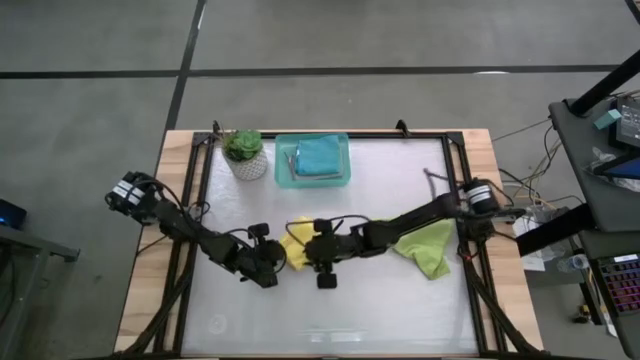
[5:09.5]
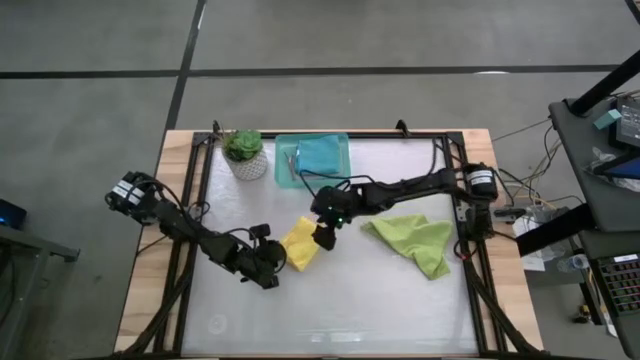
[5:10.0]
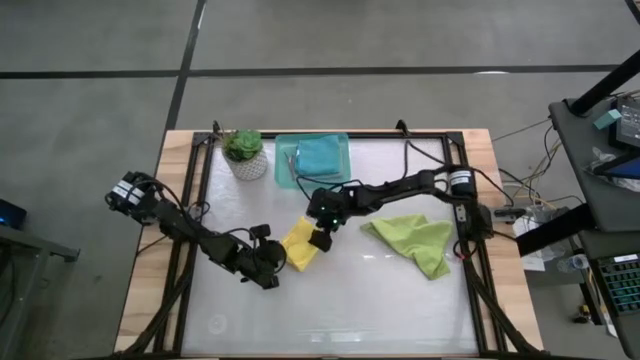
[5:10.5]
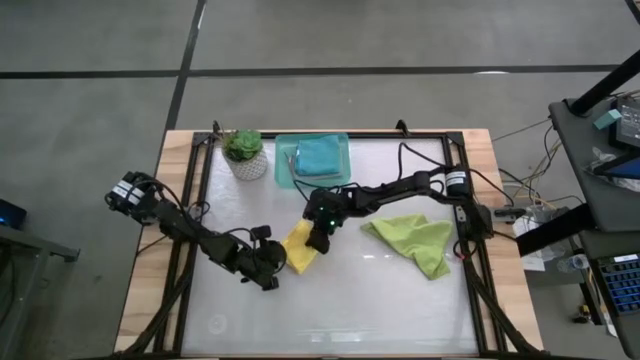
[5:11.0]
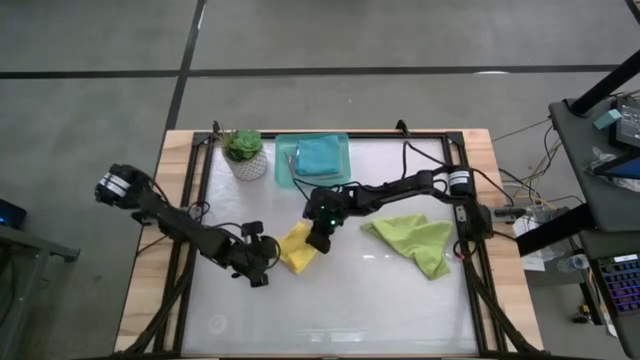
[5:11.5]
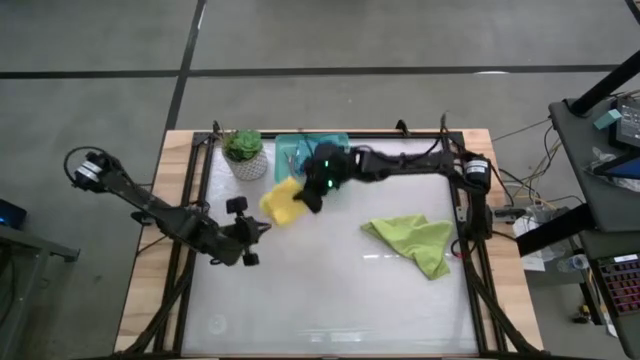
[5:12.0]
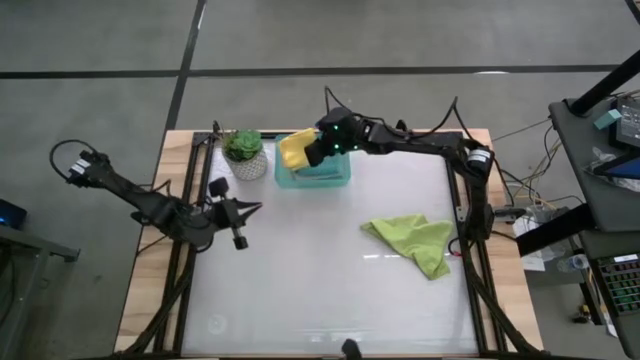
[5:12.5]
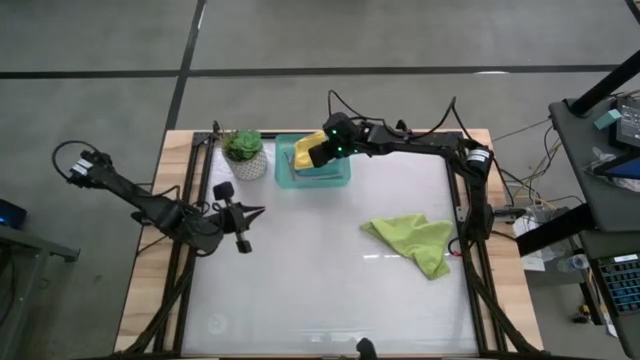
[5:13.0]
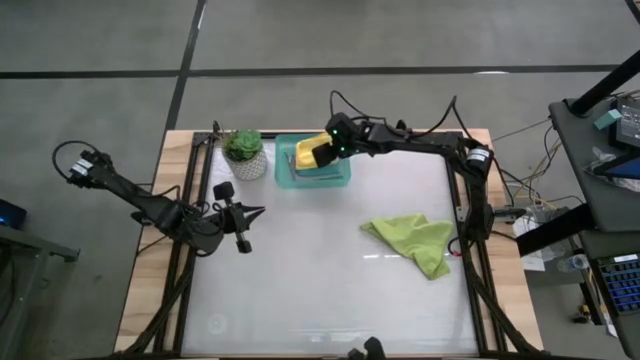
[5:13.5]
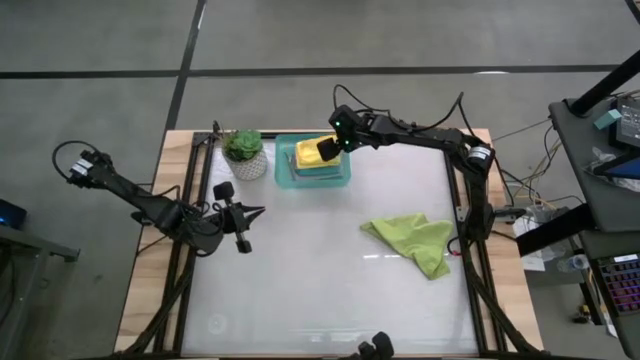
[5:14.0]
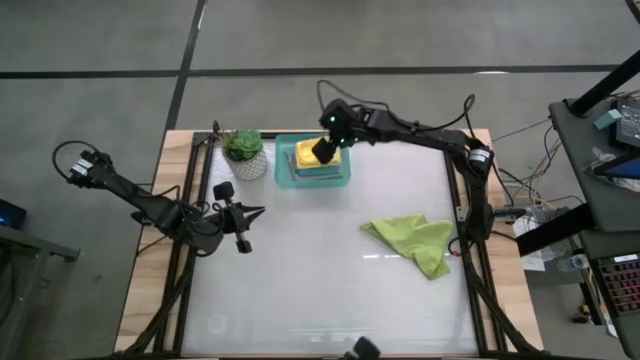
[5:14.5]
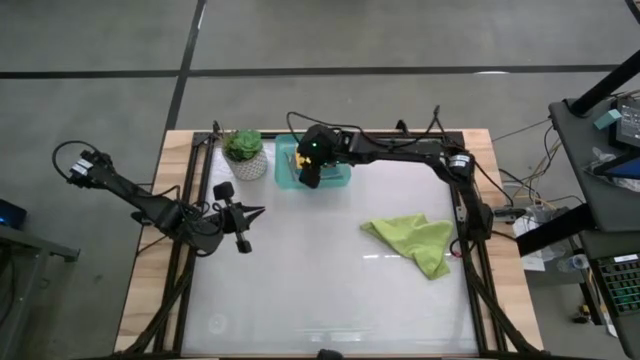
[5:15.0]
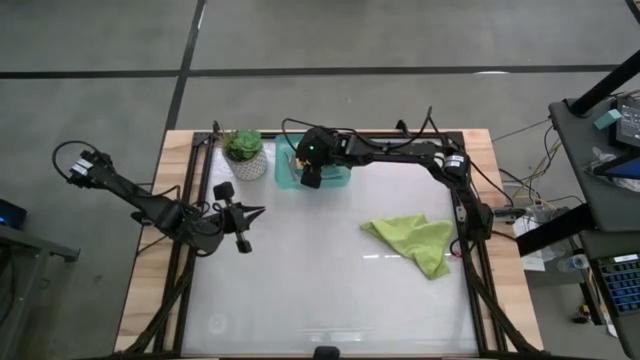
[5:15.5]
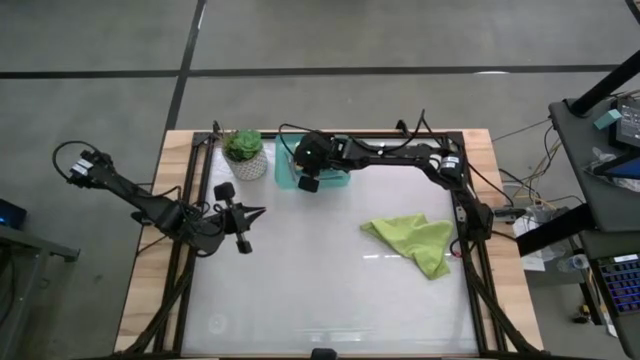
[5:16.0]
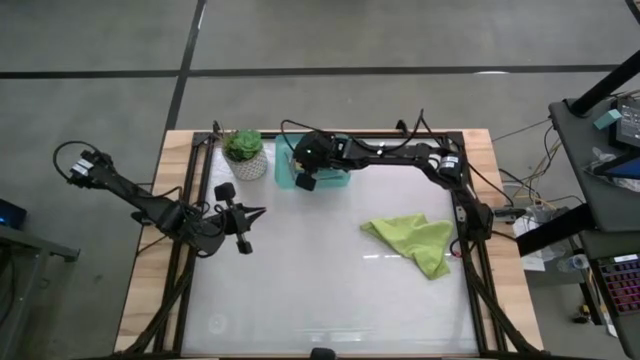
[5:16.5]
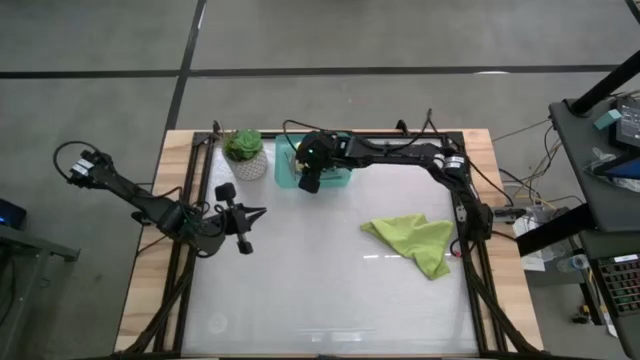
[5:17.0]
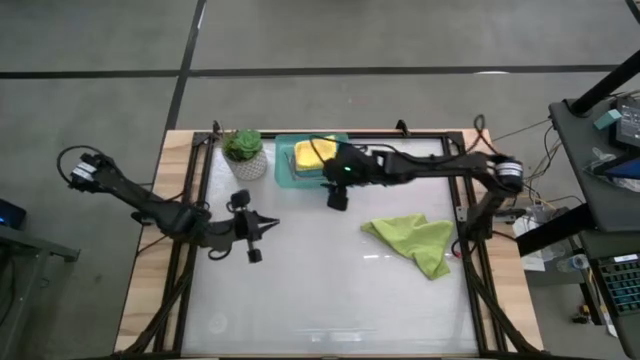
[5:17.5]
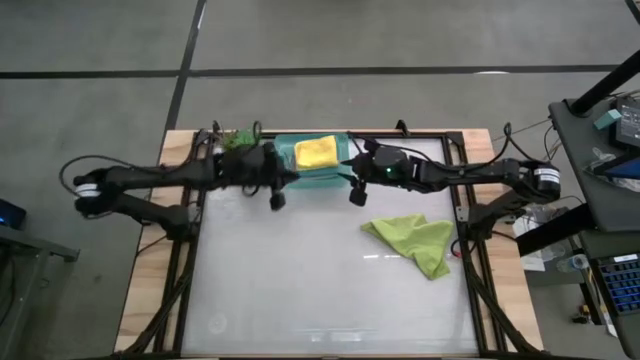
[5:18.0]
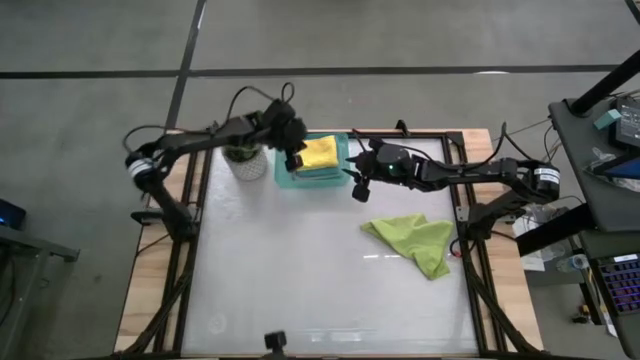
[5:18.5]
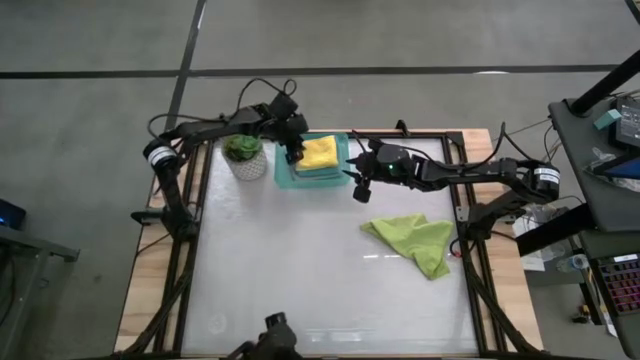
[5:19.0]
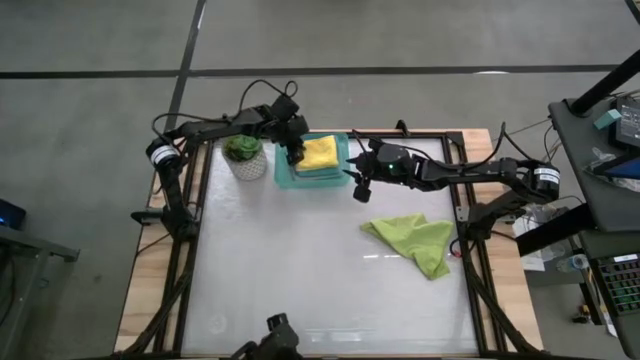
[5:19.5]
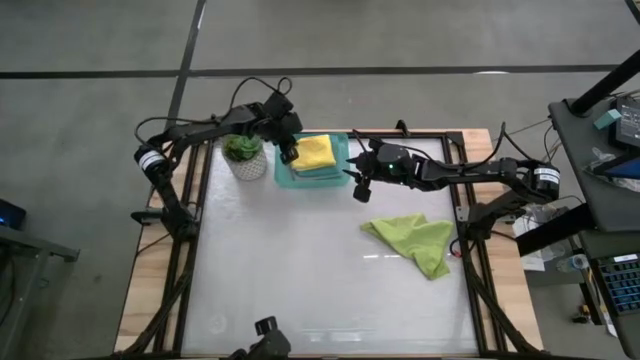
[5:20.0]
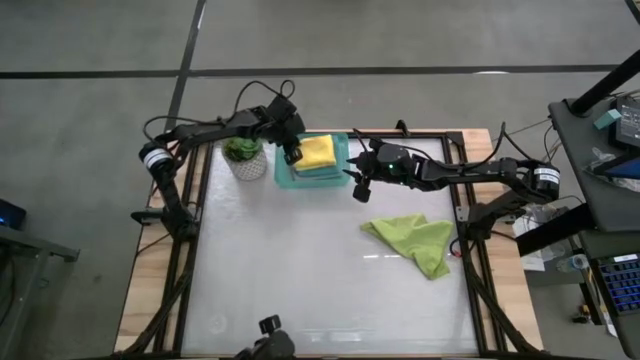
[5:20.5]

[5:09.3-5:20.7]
Task: Fold microfiber towels
Put the yellow microfiber cloth into the green bin

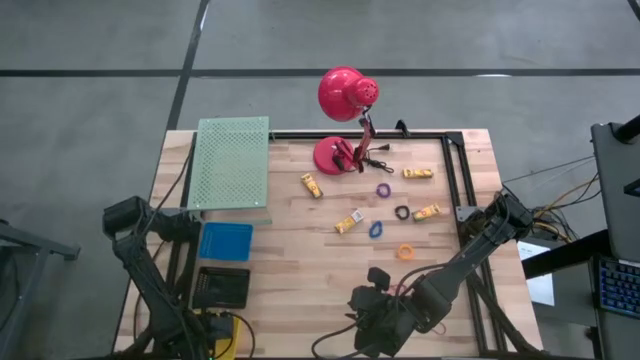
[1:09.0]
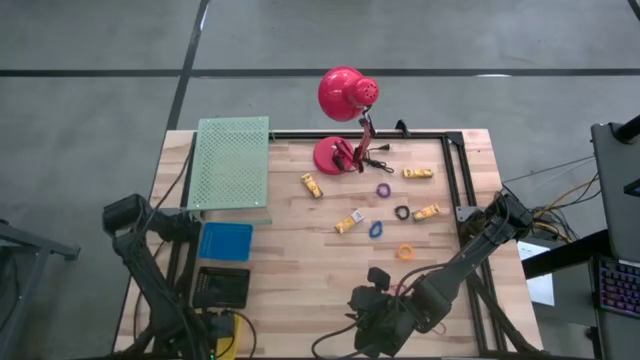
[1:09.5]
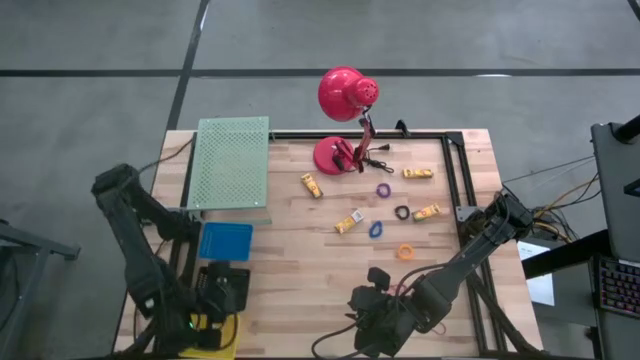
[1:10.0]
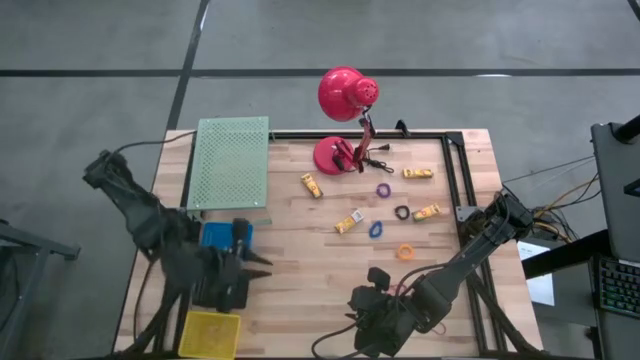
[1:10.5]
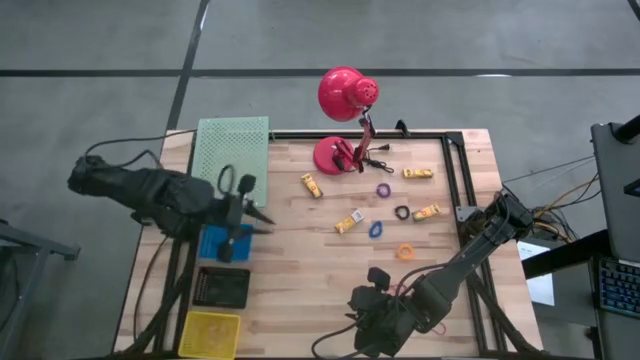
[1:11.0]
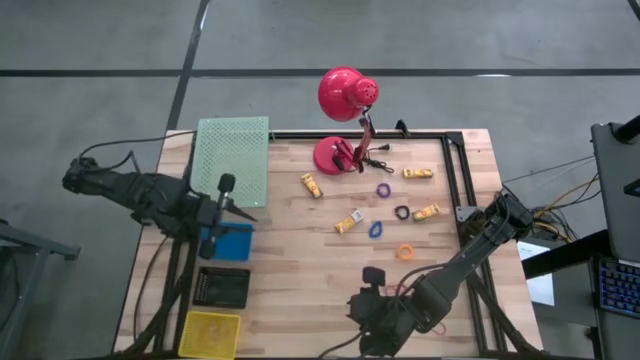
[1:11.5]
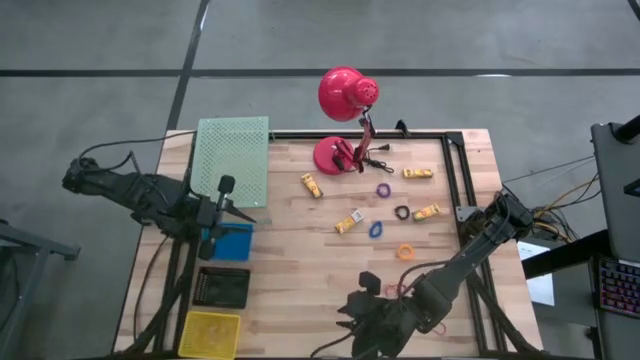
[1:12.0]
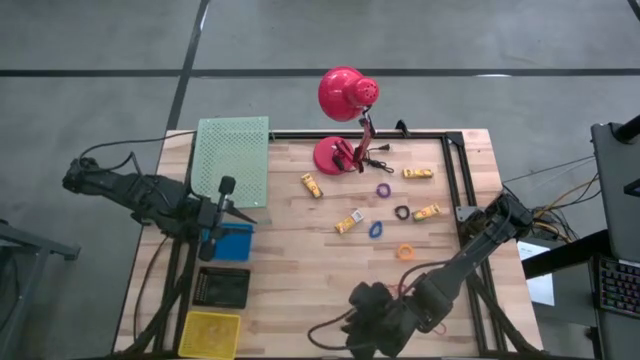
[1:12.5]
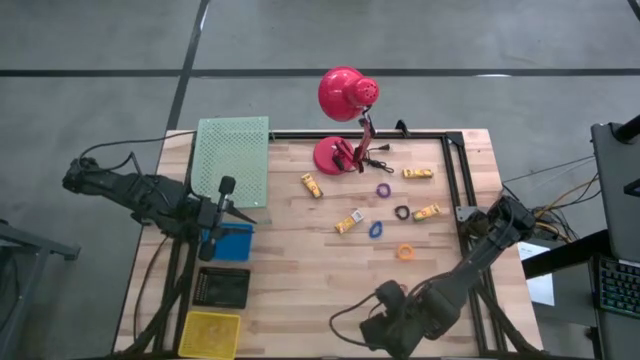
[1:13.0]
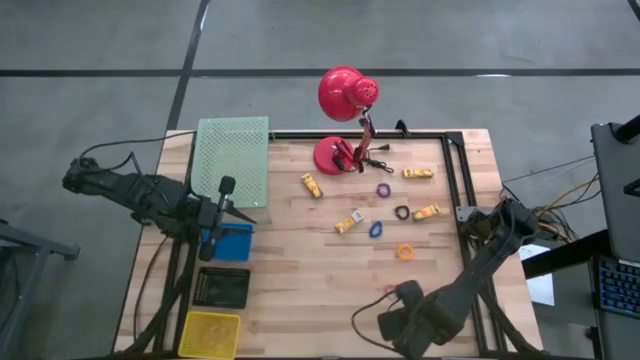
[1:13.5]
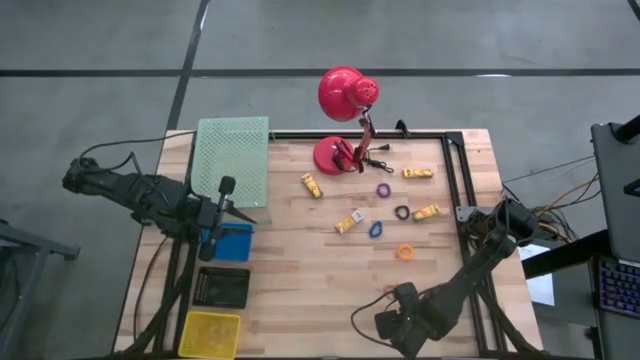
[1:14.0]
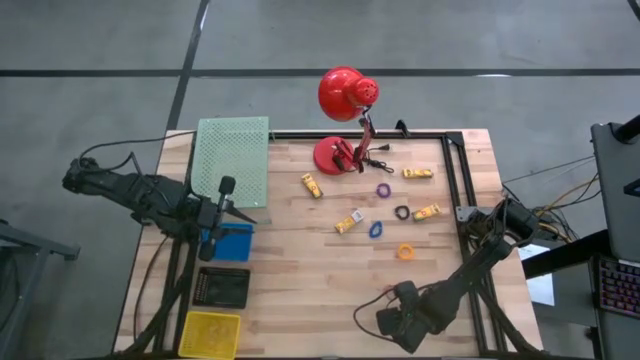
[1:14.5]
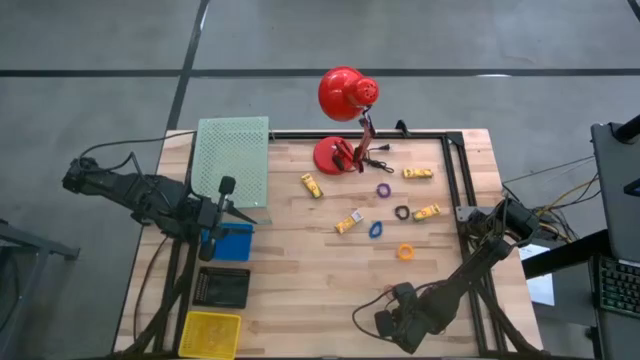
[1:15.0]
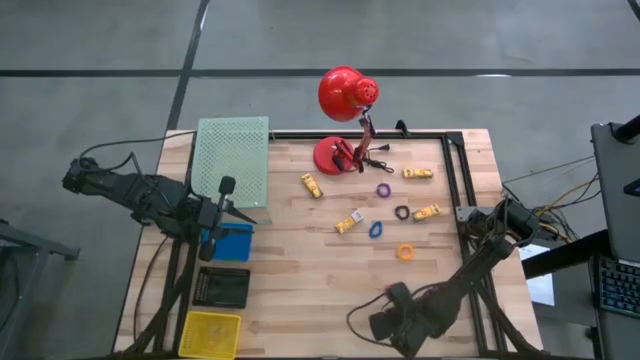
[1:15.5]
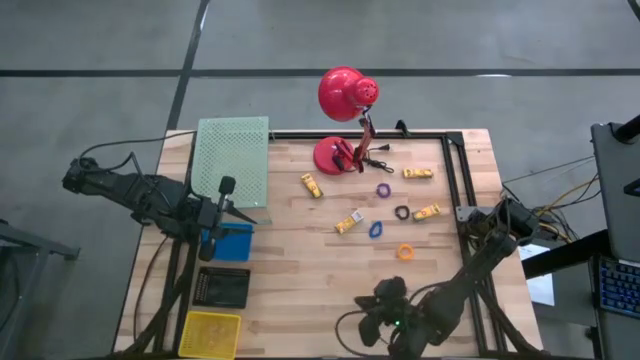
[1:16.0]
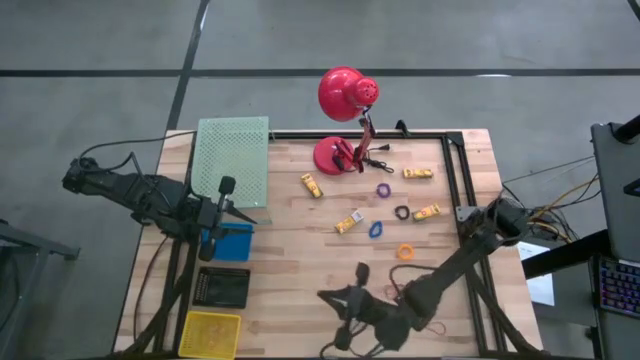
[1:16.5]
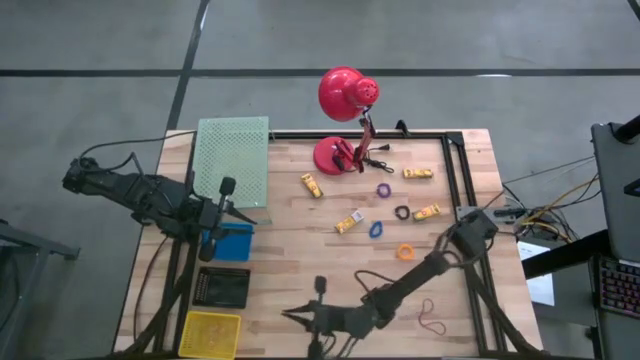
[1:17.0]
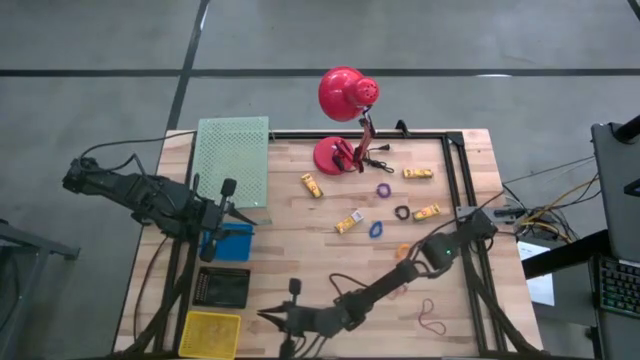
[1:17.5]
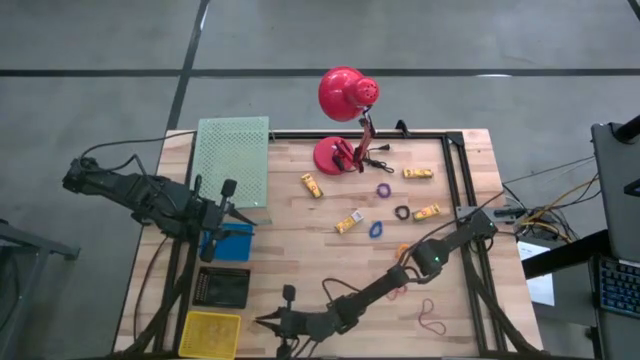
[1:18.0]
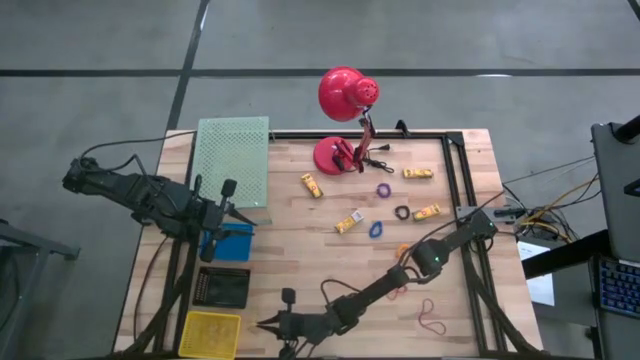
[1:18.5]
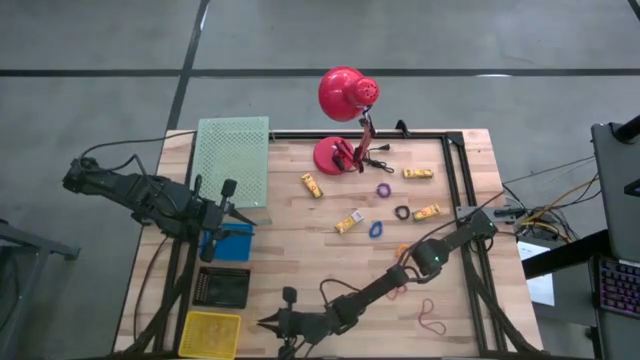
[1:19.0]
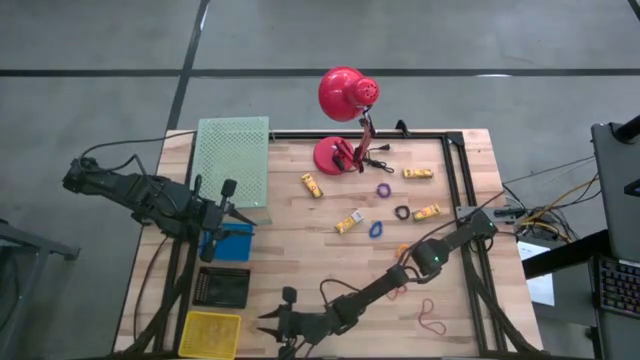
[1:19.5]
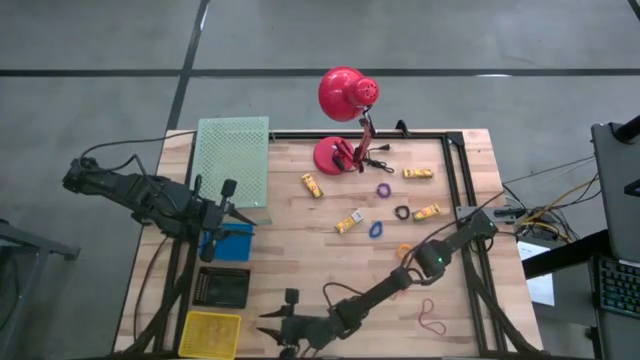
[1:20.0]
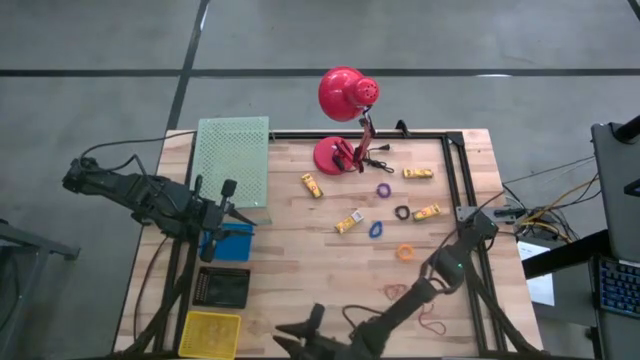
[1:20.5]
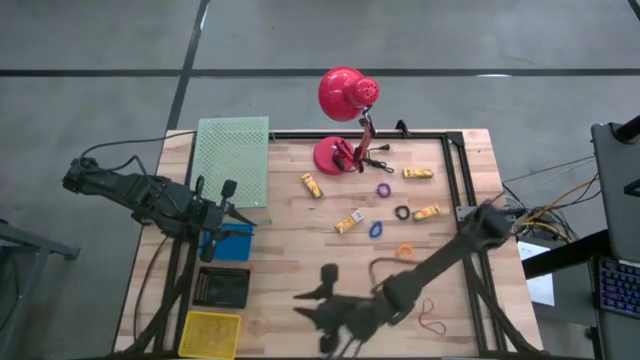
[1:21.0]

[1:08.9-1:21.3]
Task: Pick & Place Office Desk Supplies
Put the yellow rubber band into the yellow bin
